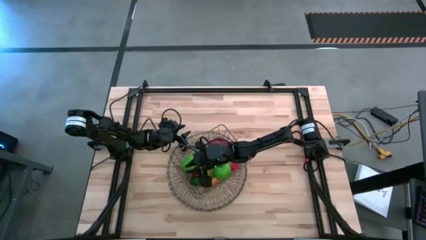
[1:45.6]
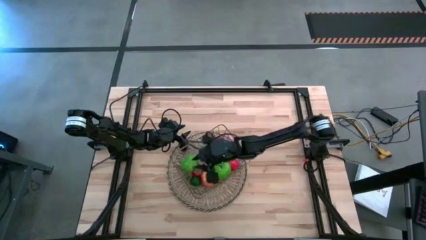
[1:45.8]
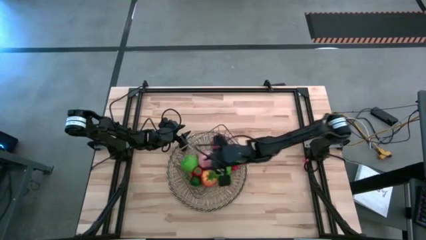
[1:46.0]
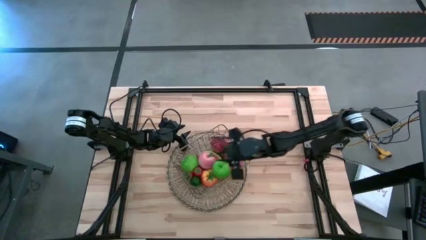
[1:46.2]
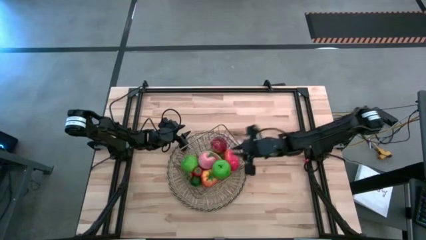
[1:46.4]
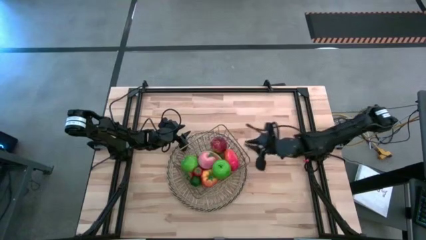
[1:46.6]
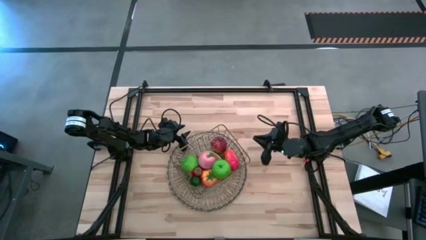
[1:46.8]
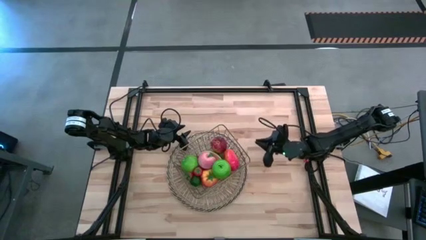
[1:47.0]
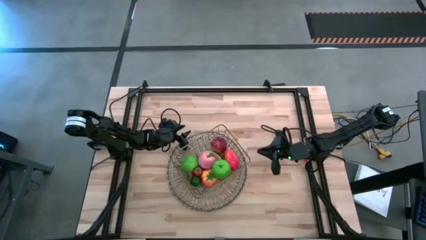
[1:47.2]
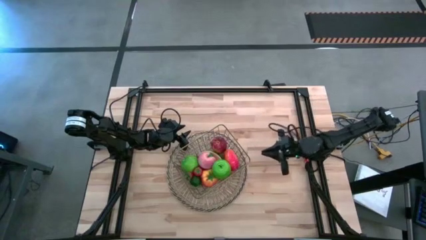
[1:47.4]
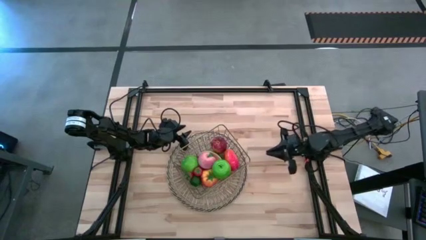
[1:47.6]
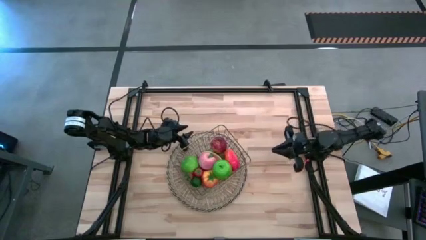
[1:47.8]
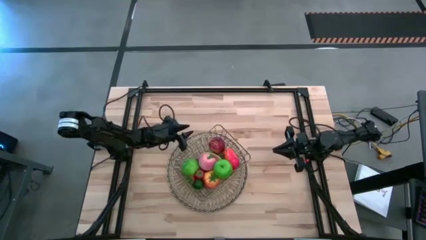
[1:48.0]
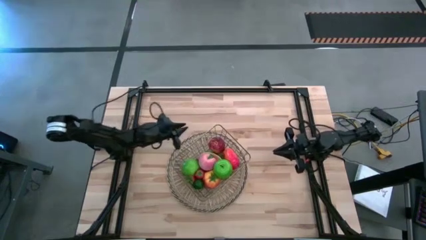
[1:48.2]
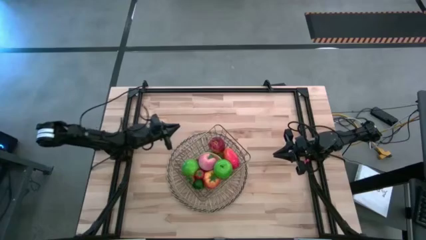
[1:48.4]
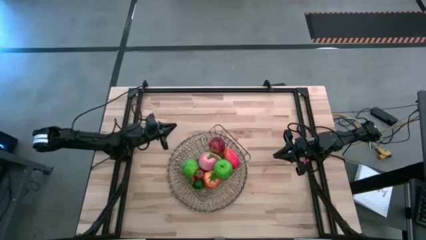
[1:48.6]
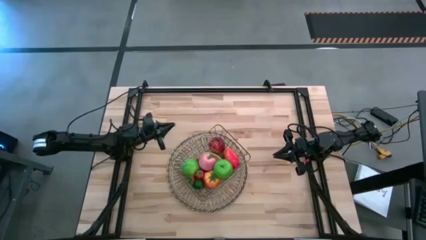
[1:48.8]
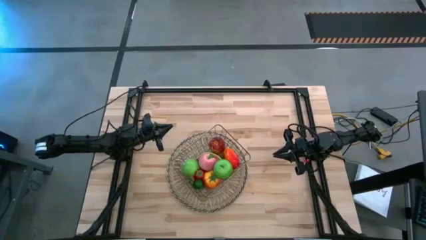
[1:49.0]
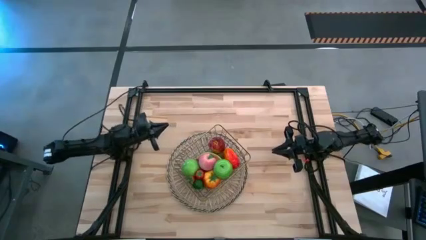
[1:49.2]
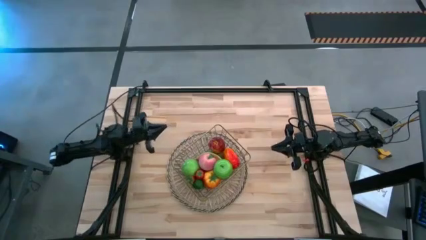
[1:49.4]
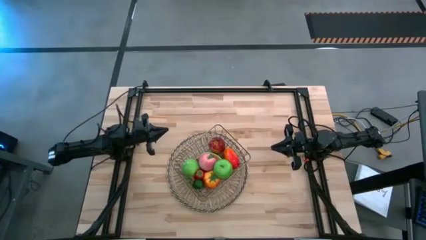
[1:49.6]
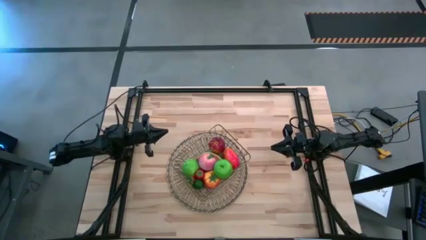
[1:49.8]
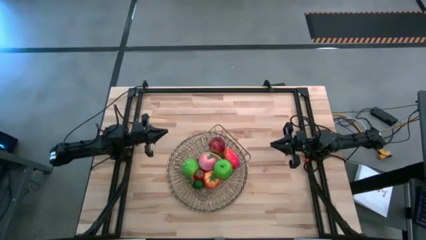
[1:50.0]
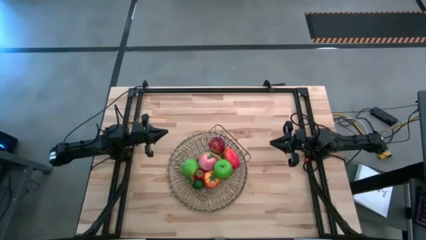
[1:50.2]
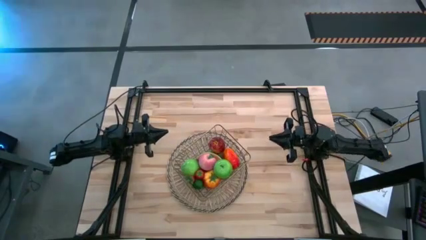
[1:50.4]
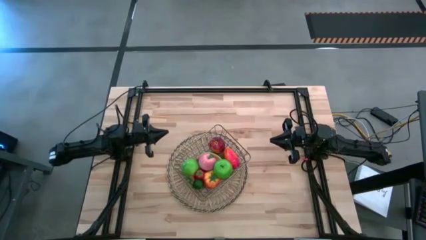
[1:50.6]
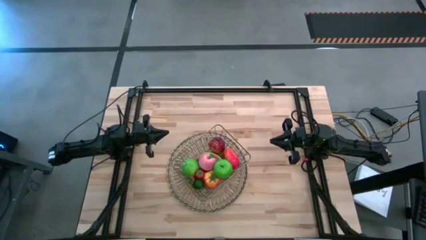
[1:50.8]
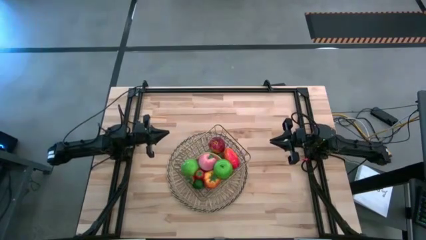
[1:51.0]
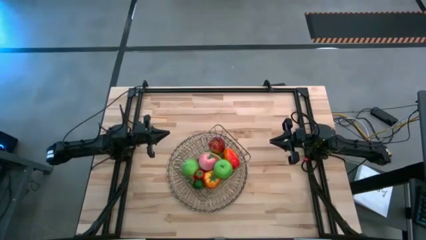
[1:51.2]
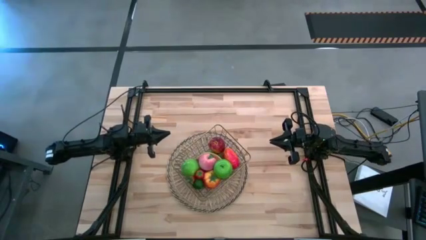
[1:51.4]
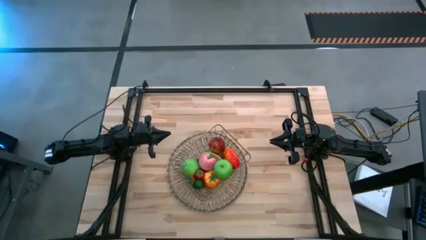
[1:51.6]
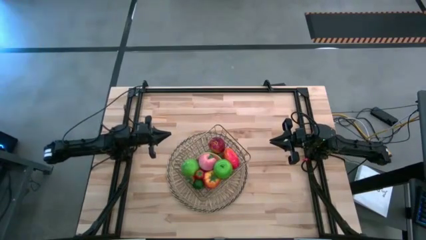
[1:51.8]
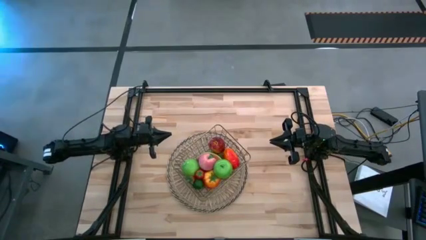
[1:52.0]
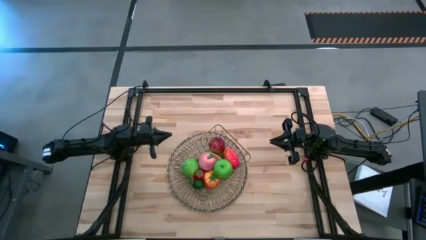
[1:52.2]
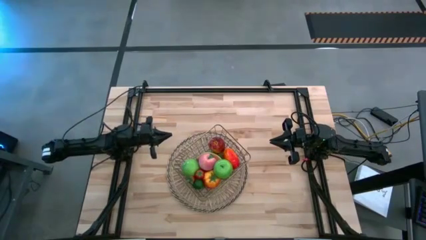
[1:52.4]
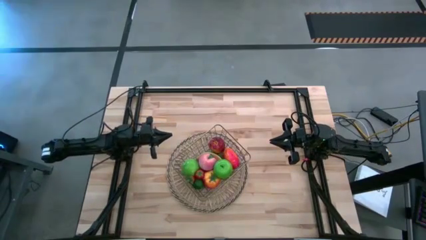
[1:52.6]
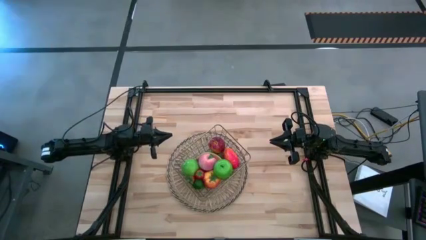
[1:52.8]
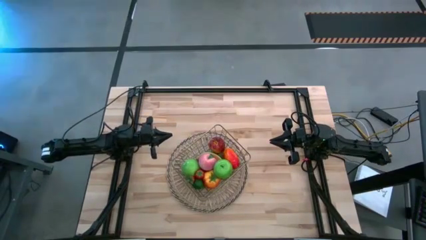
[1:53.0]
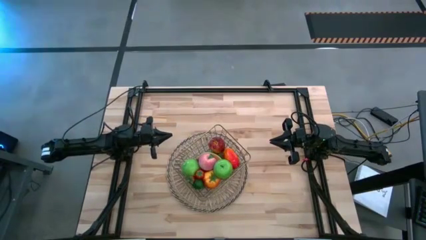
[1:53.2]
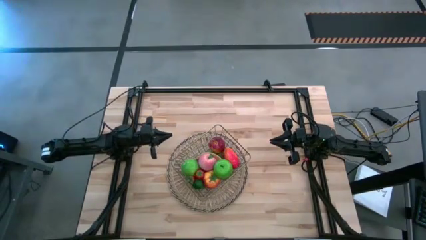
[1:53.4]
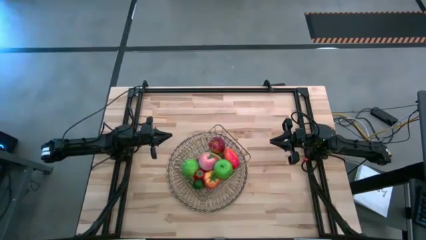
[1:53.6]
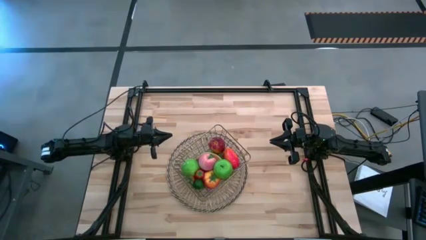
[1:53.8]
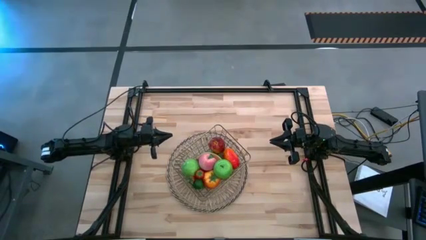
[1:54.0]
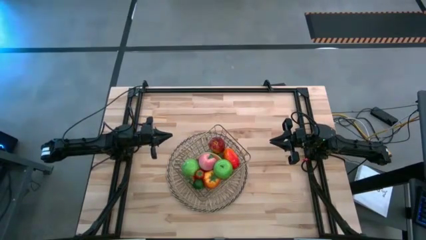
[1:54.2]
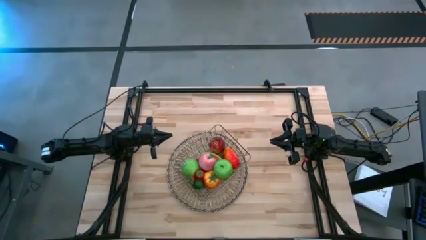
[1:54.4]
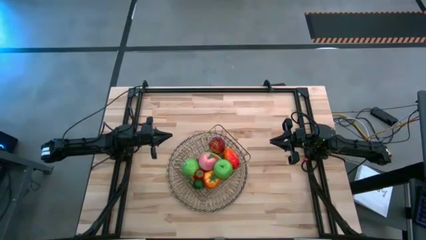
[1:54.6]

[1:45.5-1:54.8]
Task: Build produce basket
Return to Home Position

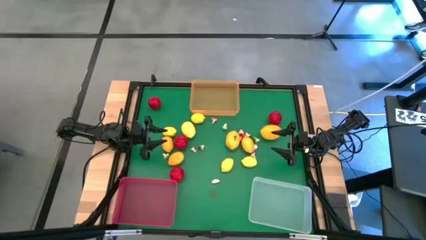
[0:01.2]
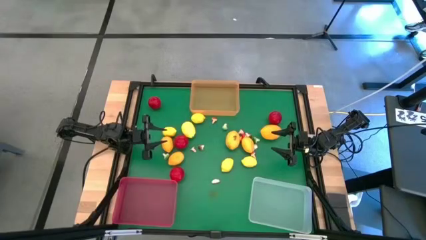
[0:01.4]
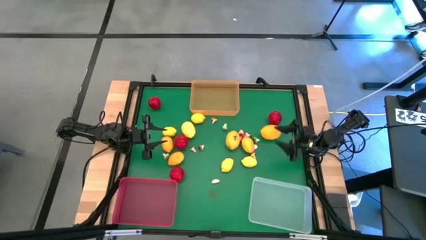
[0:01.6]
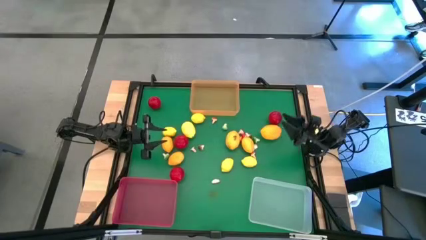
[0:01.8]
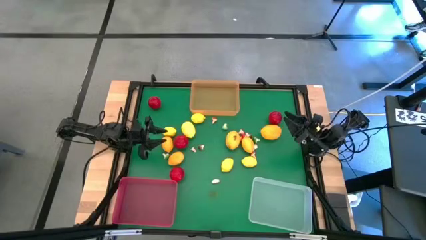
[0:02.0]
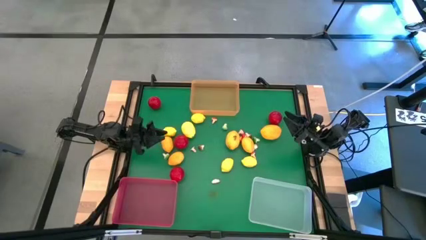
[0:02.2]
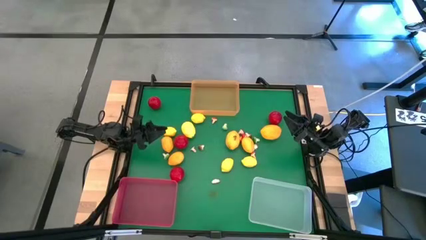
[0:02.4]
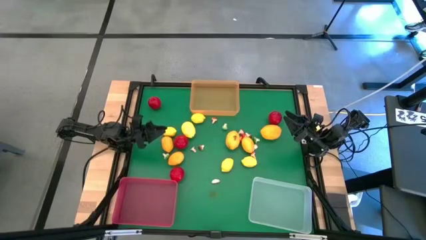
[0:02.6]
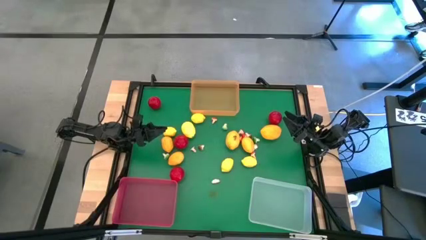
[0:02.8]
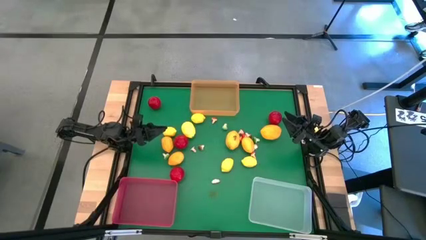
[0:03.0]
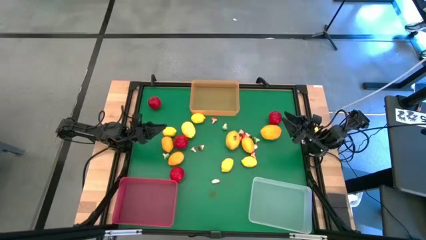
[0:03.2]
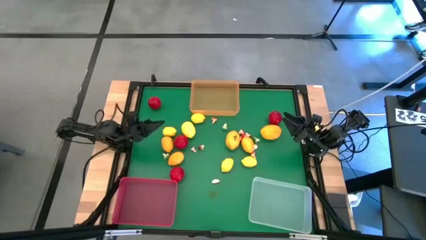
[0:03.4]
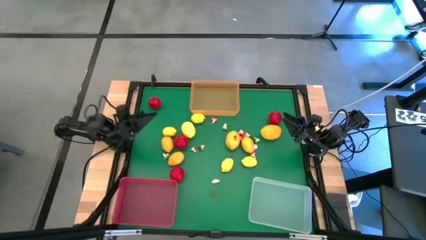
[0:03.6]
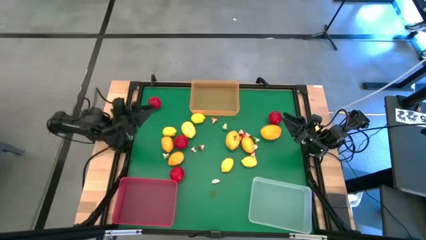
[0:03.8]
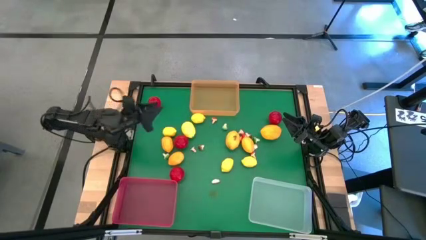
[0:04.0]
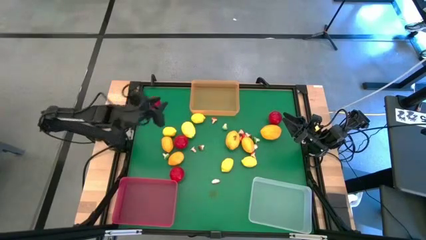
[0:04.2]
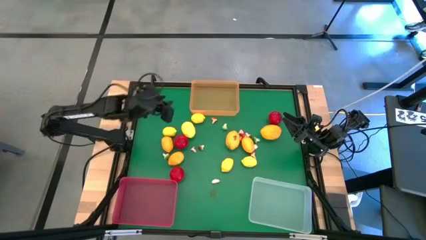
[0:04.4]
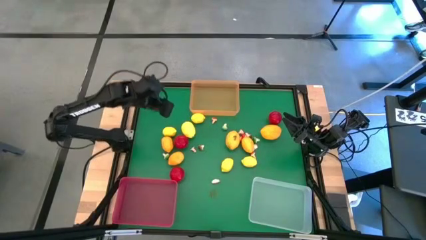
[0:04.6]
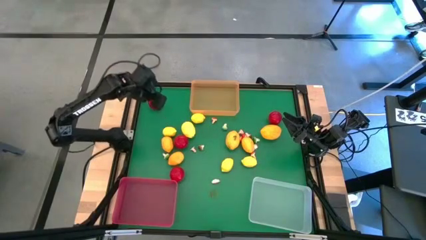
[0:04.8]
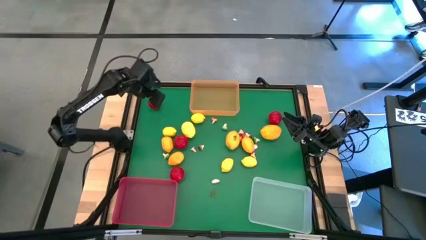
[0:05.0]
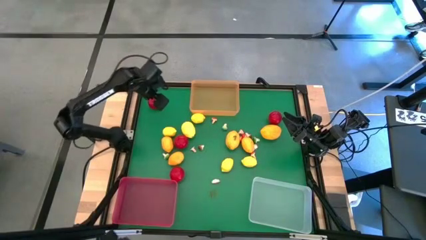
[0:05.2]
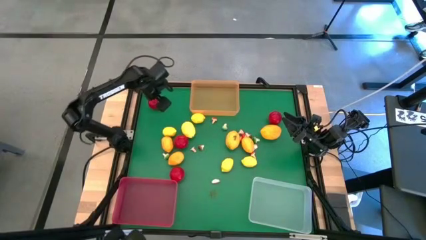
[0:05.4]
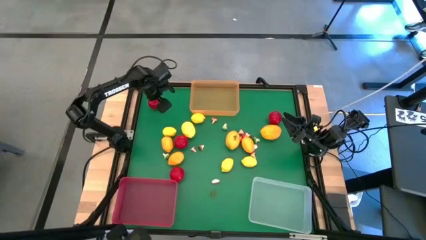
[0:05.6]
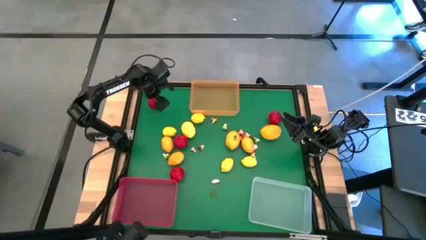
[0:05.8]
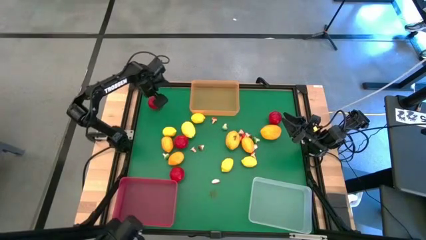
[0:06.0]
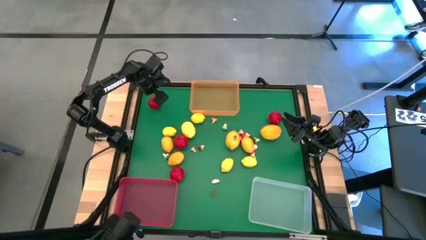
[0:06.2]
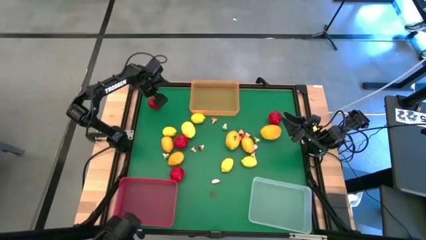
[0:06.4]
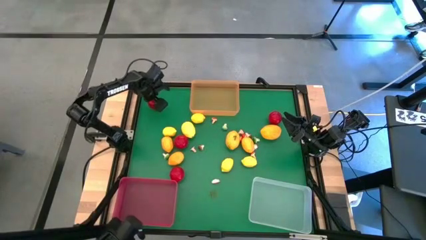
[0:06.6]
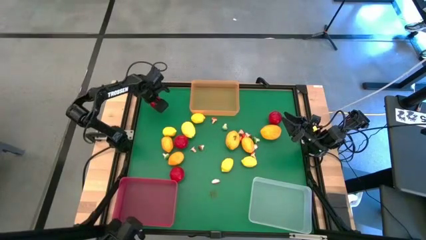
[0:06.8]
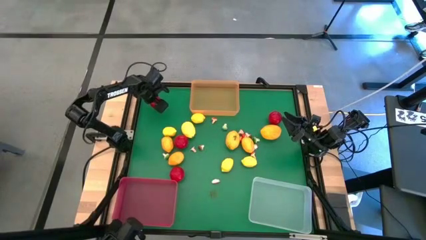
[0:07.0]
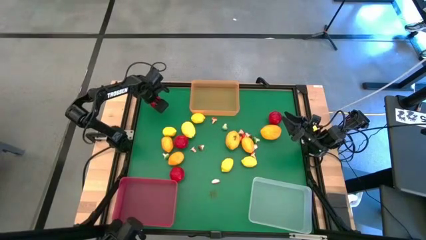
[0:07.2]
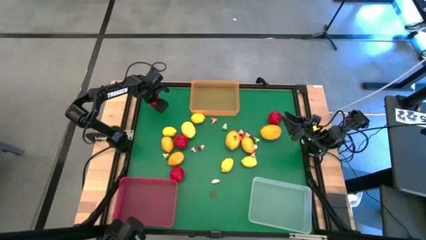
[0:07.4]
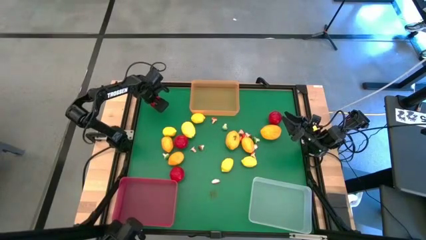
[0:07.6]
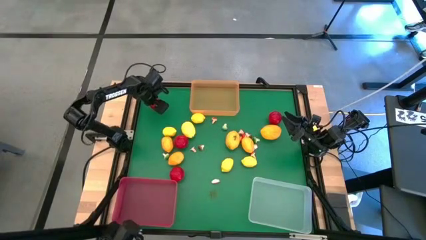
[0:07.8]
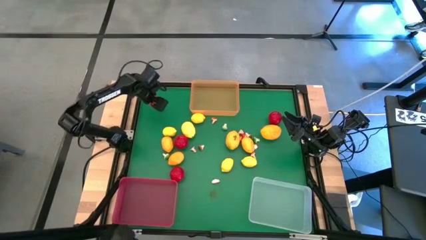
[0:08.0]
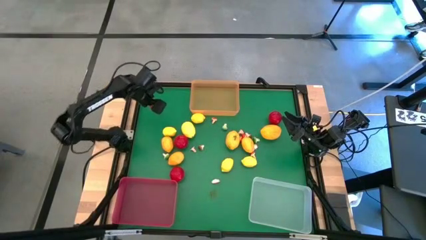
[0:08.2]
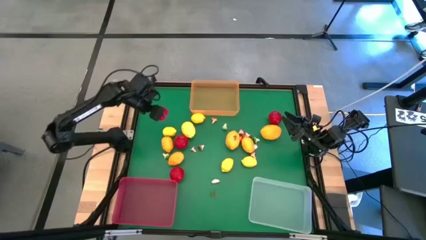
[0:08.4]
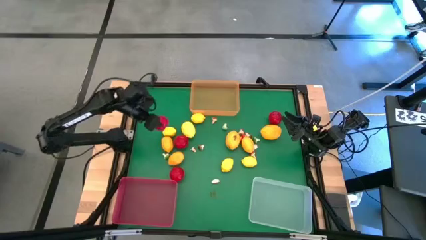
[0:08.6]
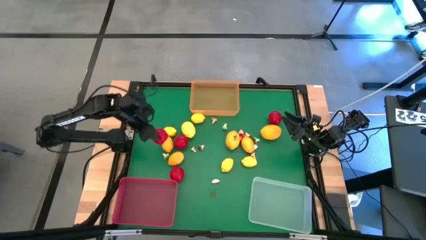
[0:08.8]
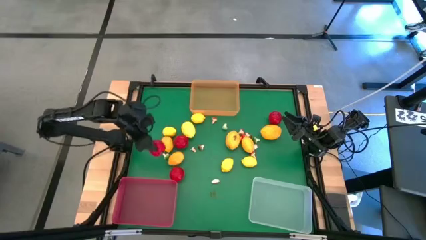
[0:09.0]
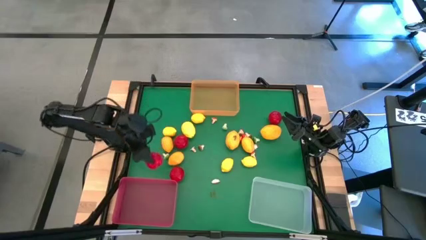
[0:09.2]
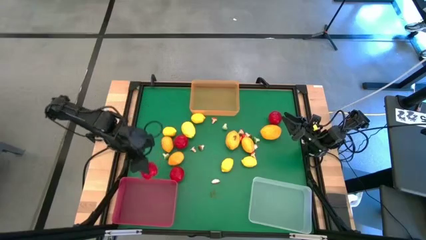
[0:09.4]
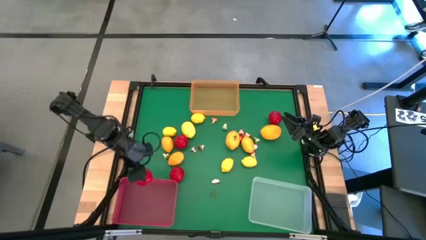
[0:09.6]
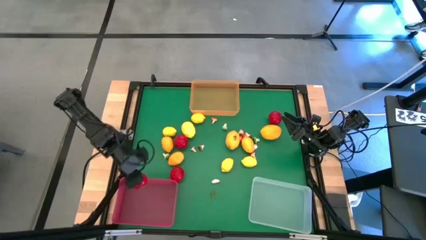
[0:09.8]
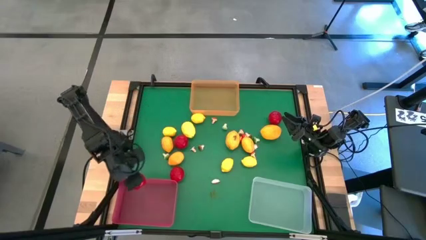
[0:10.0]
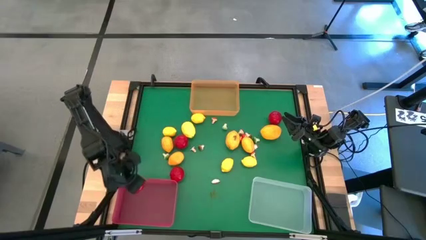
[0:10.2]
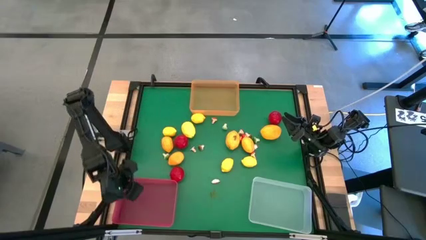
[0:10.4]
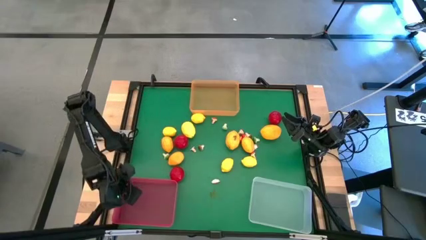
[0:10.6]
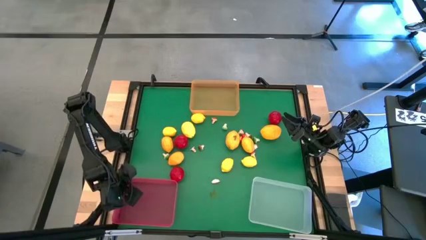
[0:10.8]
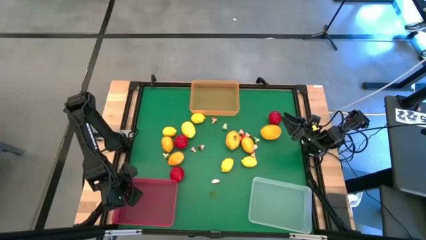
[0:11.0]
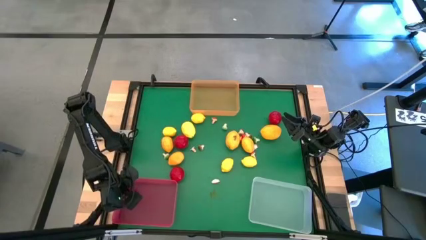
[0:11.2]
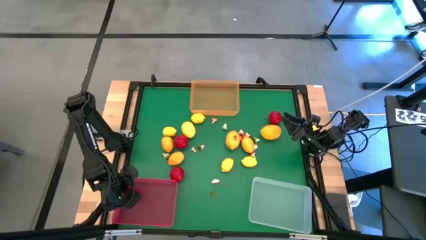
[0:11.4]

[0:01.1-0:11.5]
Task: Sort produce into baskets
Put the tomato into the red bin
